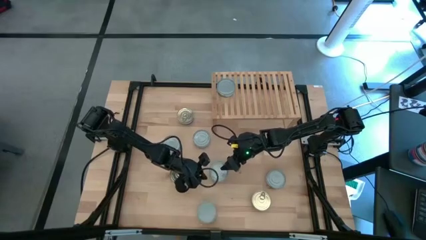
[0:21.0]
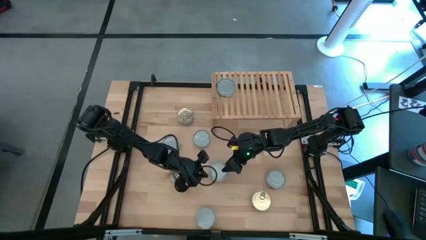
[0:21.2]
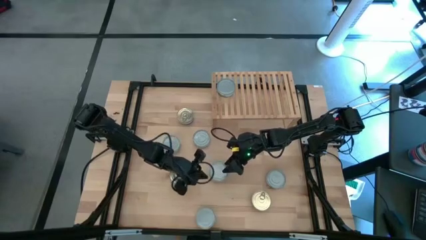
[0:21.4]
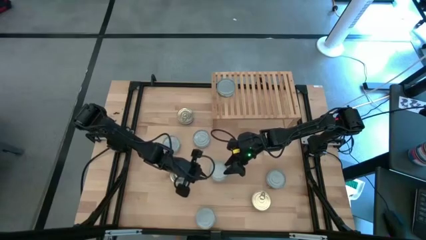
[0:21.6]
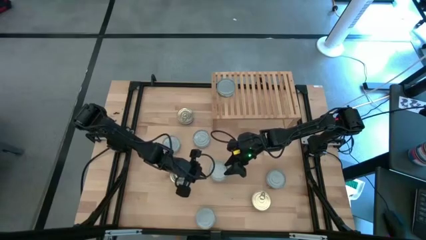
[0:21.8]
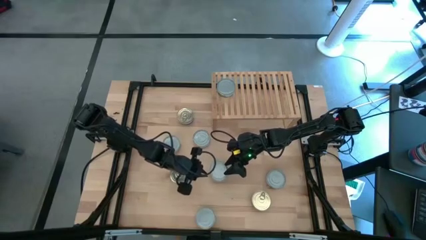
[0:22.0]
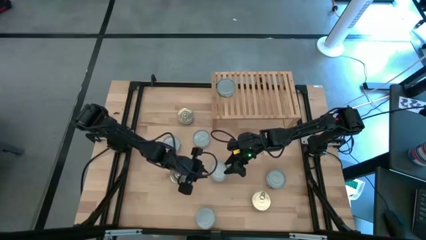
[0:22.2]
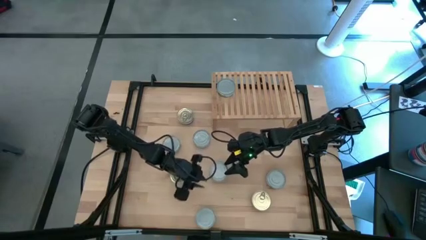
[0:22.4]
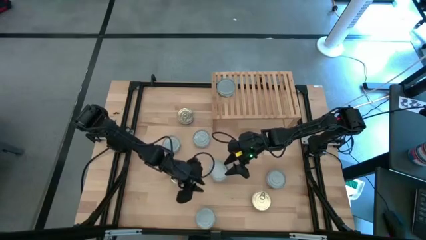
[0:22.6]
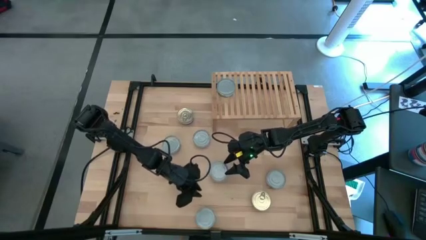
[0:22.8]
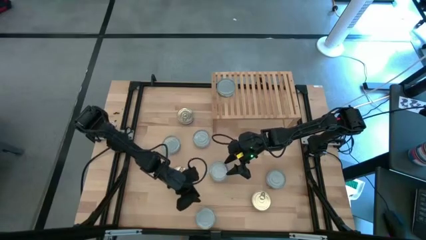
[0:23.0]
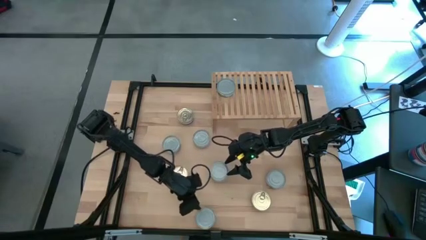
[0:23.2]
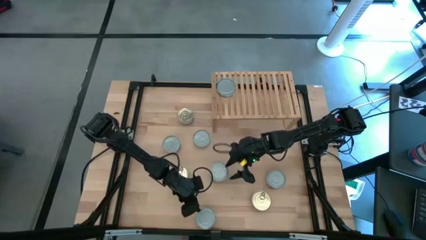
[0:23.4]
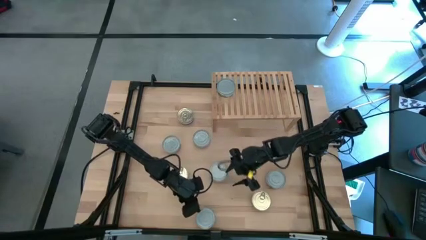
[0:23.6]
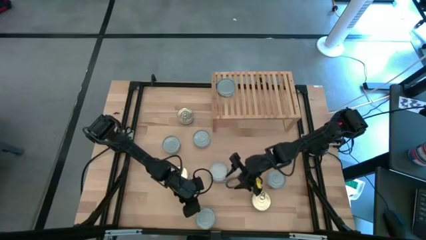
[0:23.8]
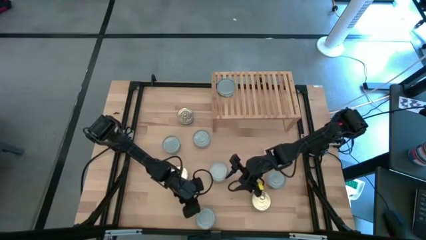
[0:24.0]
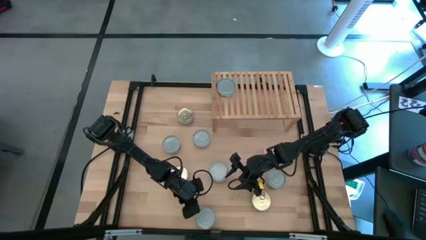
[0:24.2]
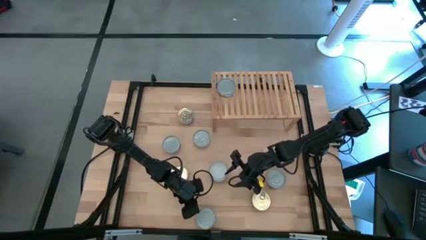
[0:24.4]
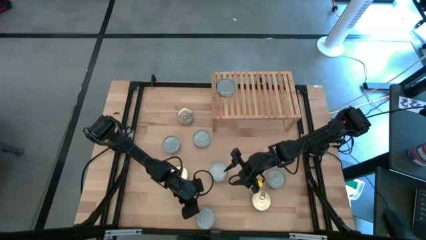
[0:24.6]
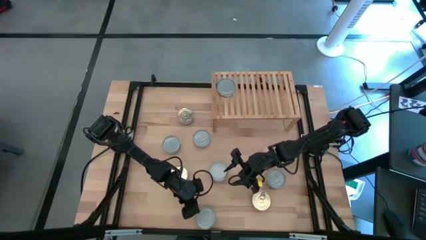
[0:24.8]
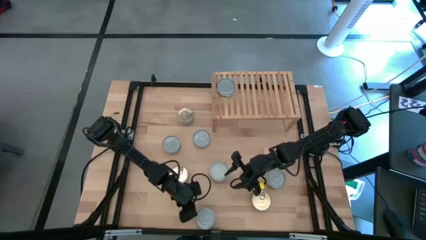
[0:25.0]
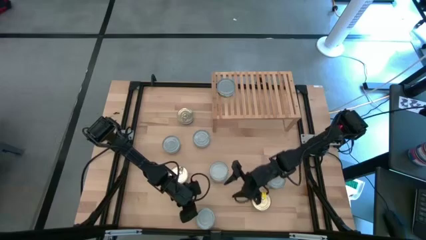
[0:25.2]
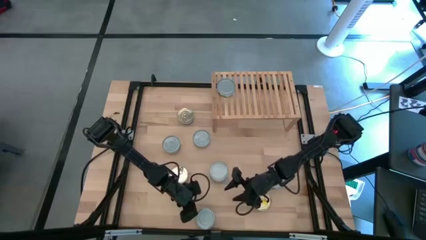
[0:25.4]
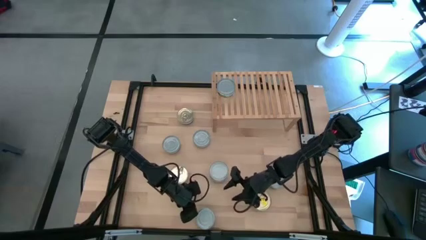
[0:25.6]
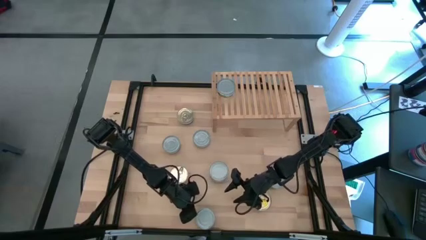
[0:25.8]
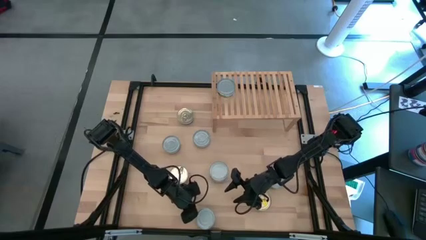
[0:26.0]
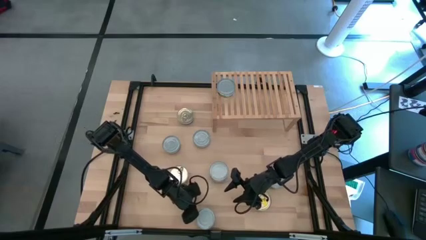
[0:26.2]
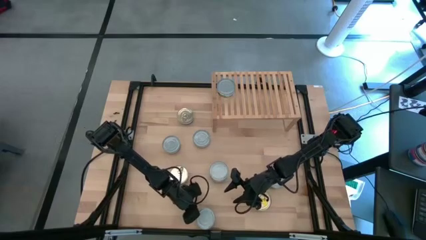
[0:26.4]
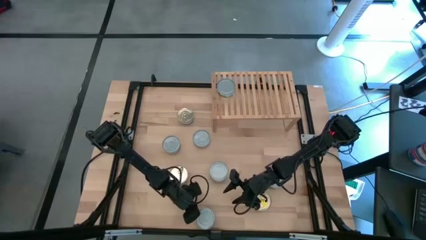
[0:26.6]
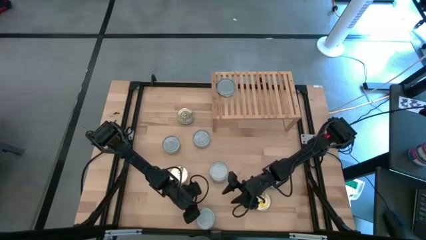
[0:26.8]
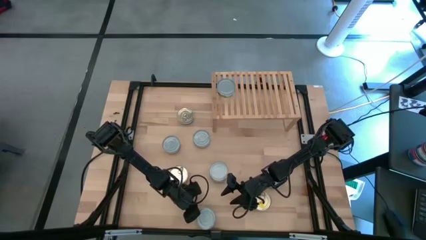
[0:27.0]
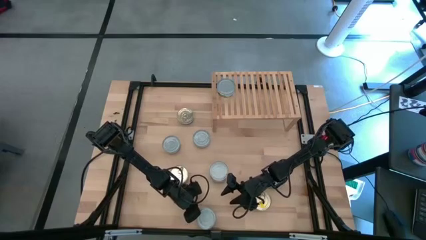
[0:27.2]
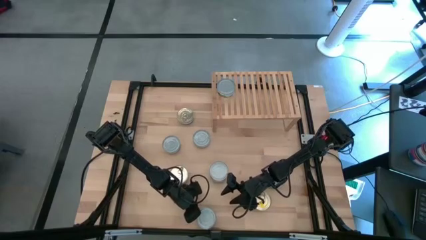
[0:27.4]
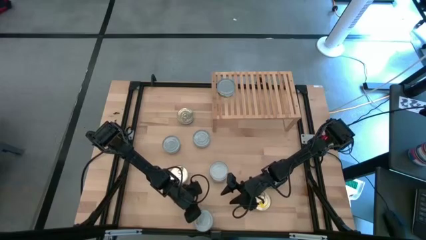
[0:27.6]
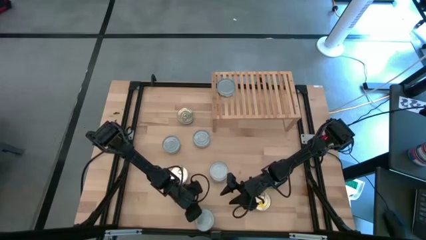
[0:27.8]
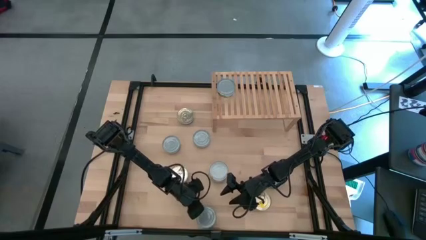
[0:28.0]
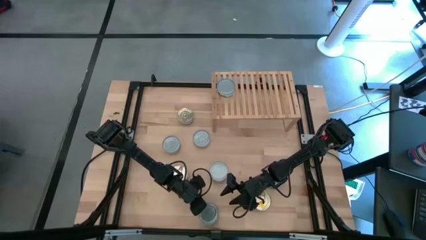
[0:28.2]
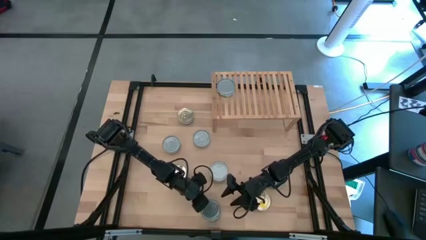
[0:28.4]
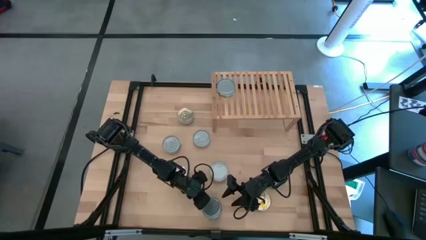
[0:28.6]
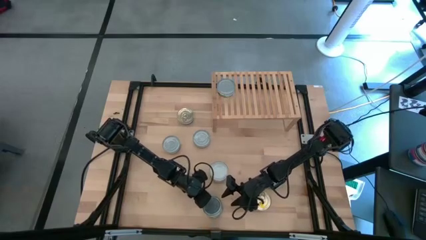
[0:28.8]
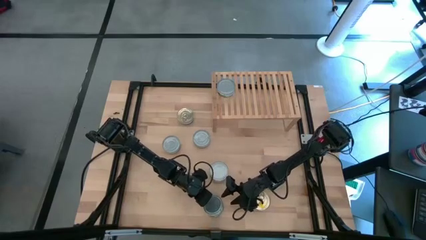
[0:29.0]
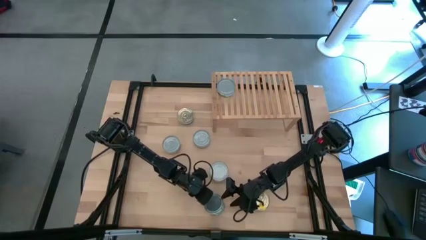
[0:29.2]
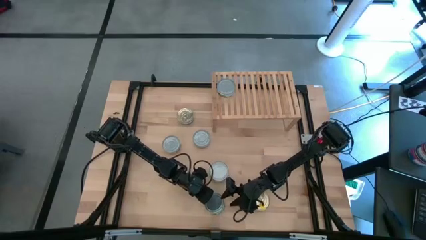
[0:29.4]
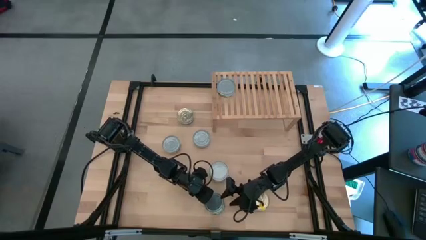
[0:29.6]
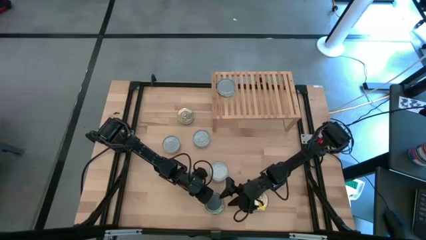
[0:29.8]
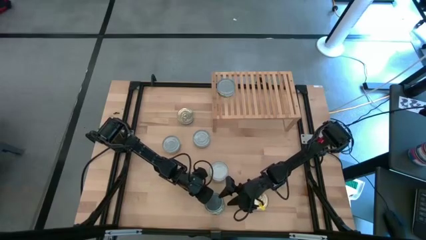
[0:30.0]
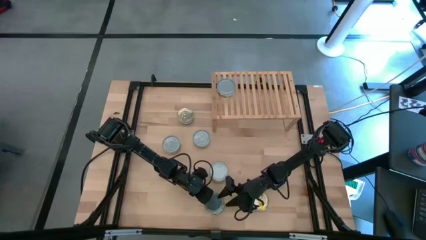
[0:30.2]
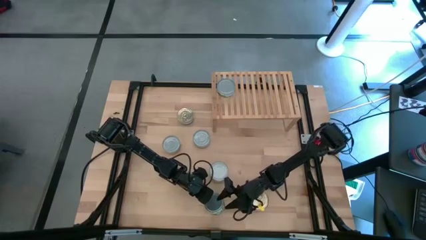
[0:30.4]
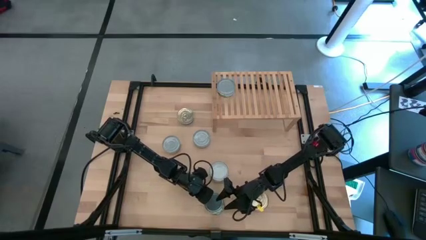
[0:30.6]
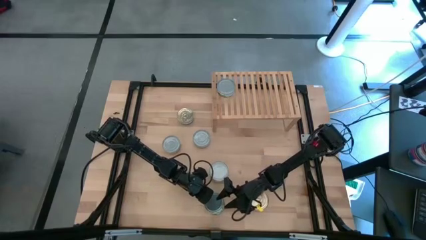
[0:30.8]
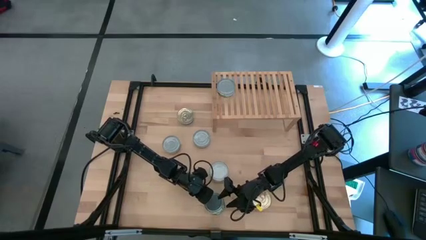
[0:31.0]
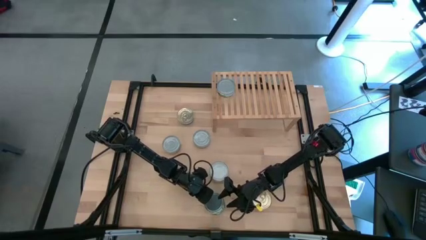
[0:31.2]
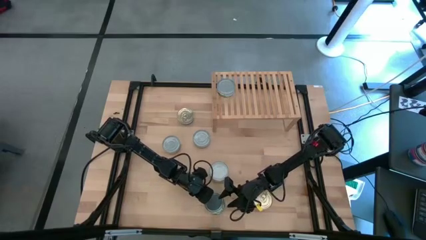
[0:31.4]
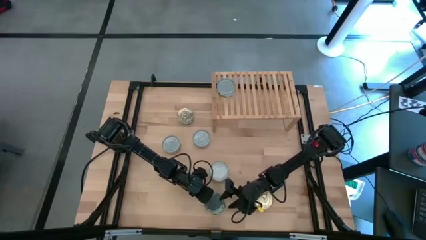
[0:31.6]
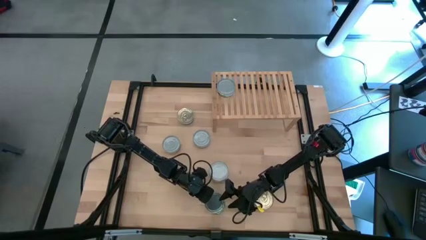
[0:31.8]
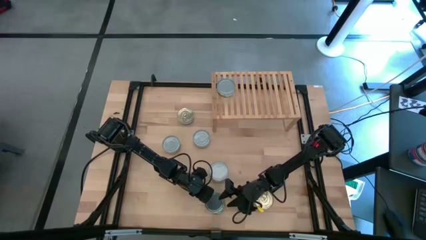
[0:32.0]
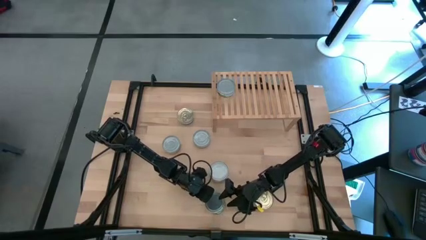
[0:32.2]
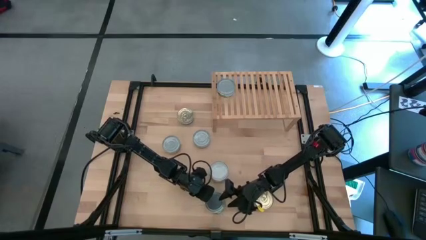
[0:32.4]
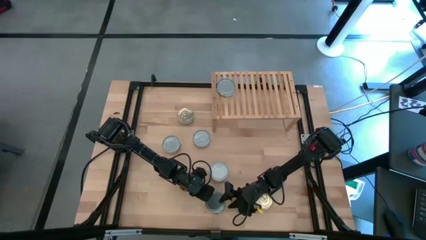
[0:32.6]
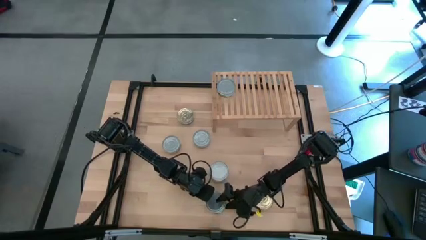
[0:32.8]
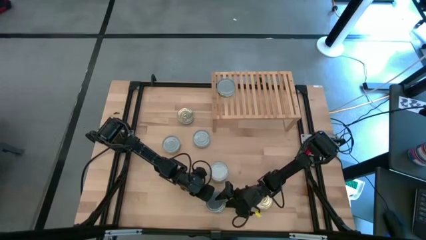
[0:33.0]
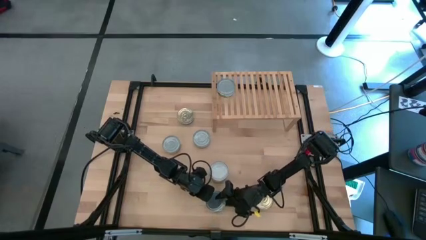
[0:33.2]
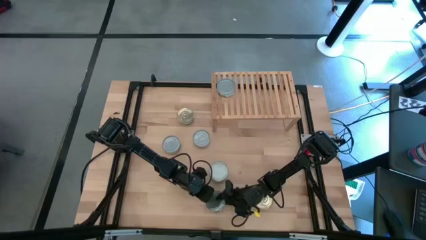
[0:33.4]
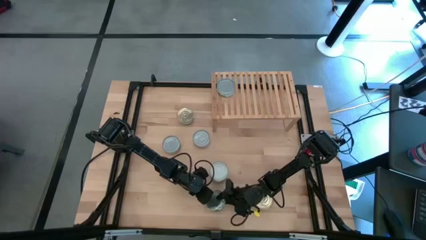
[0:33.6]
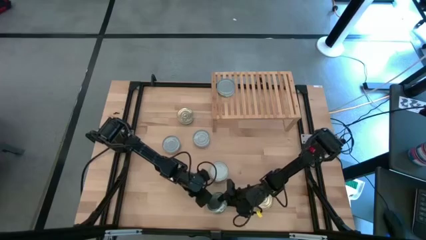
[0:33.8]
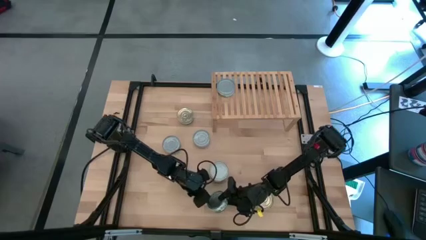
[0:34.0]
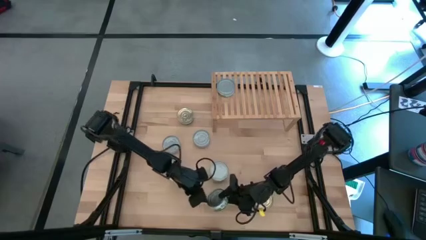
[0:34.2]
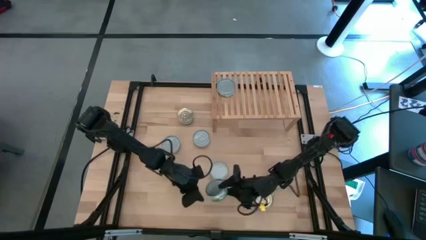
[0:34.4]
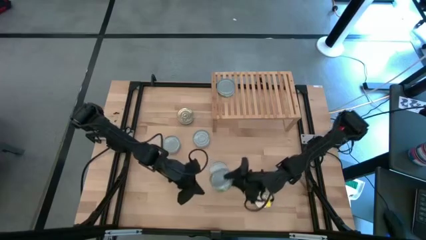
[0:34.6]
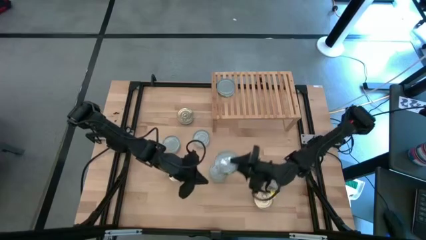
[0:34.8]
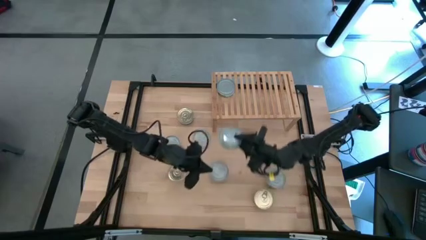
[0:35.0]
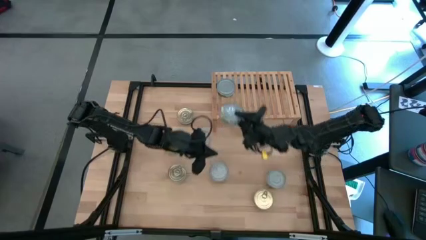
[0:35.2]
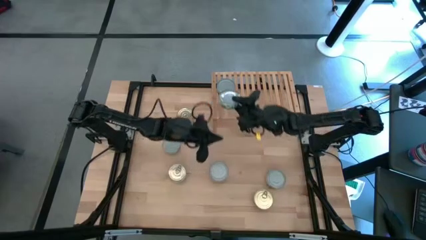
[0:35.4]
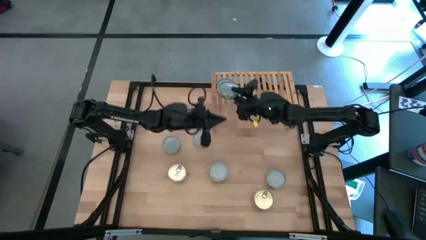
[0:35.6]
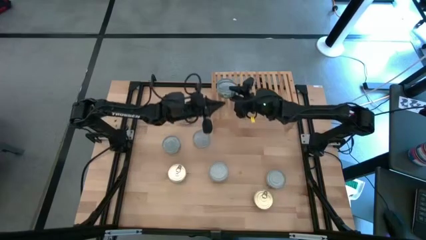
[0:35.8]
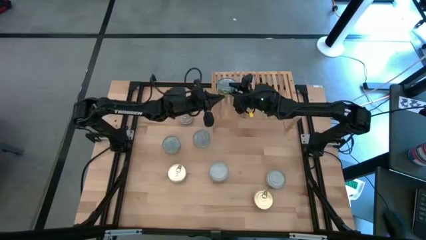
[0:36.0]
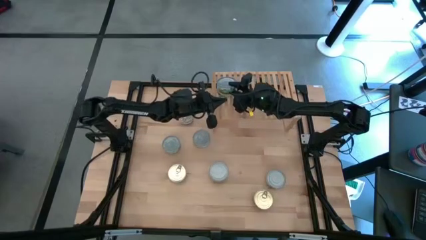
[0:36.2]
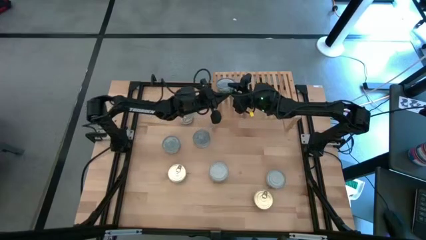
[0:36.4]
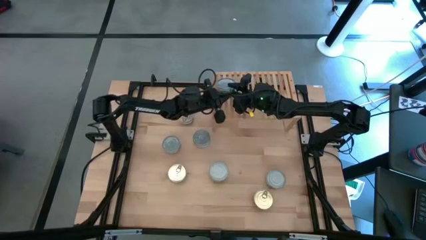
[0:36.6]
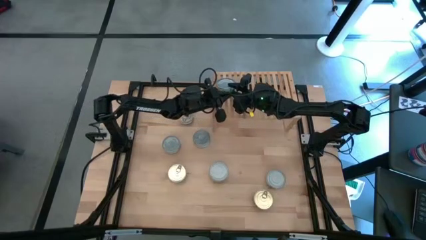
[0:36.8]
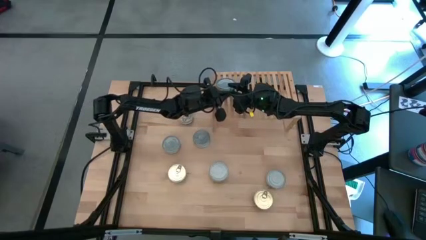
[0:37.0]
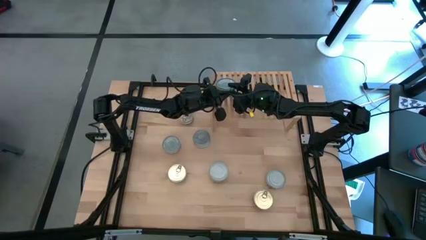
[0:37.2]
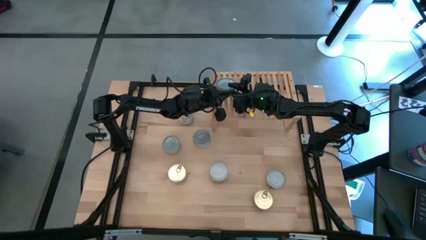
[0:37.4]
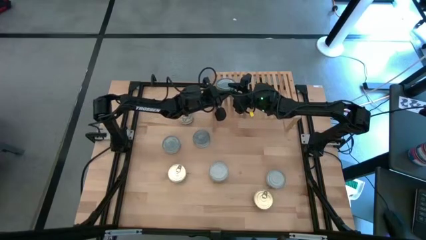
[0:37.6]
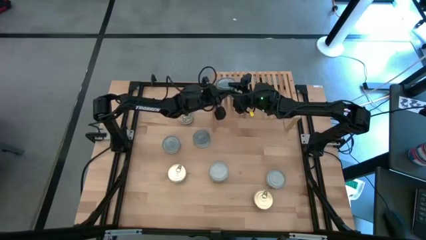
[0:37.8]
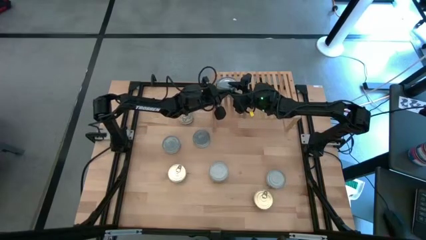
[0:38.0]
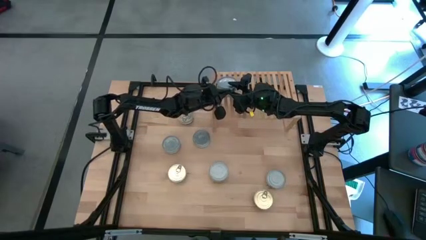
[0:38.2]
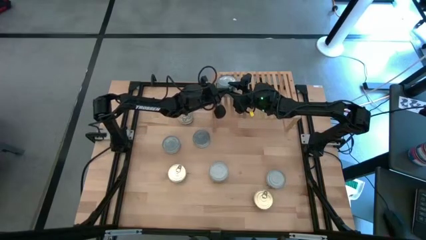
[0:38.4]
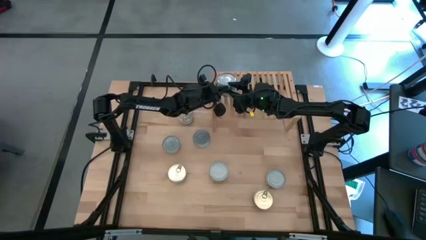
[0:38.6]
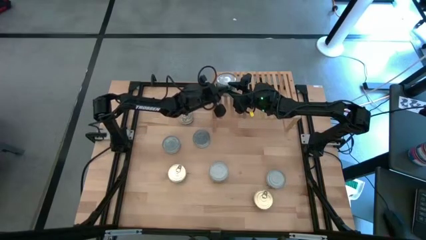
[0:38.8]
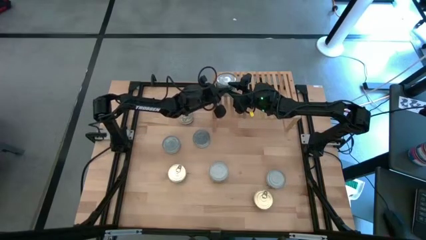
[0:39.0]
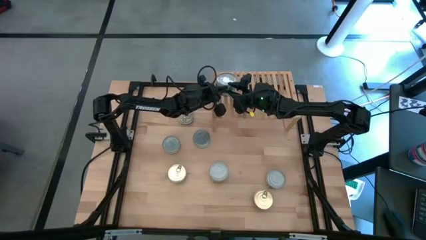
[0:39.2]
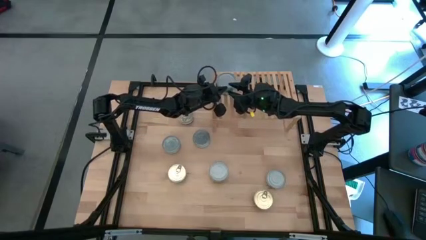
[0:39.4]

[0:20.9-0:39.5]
Task: Stack canned seafood by type on shelf
Stack the green tuna can on top of the green tuna can on the shelf
